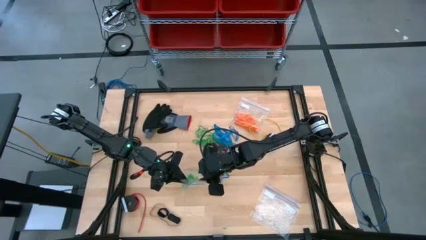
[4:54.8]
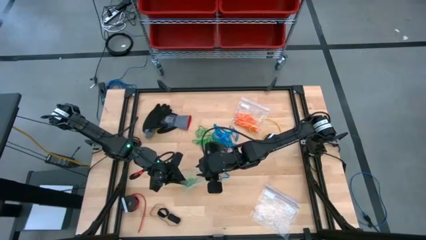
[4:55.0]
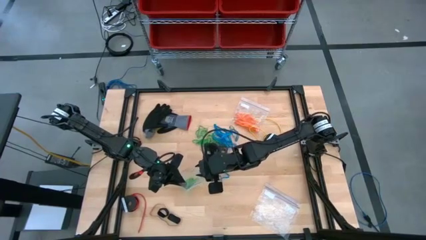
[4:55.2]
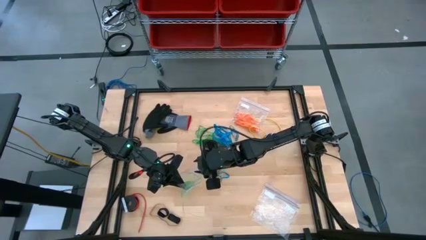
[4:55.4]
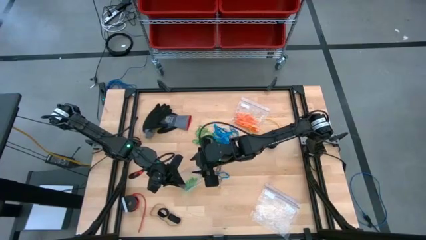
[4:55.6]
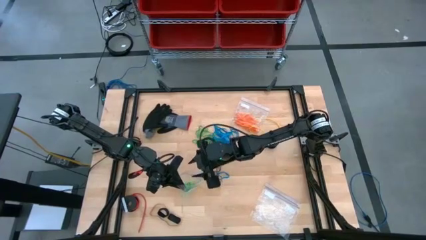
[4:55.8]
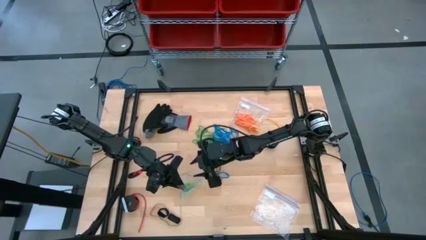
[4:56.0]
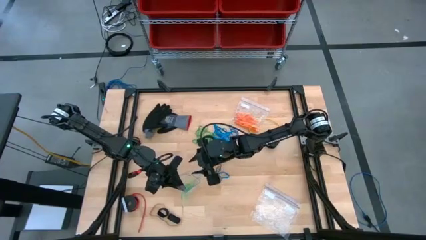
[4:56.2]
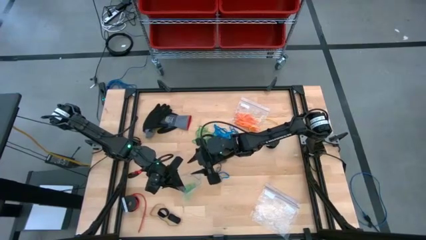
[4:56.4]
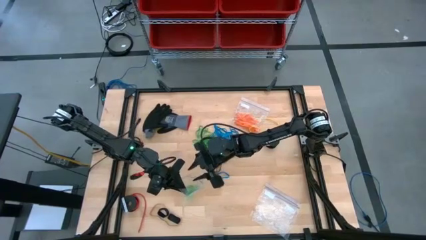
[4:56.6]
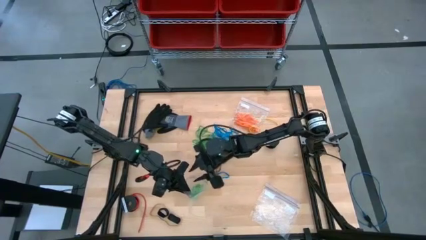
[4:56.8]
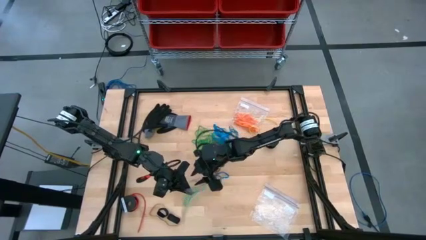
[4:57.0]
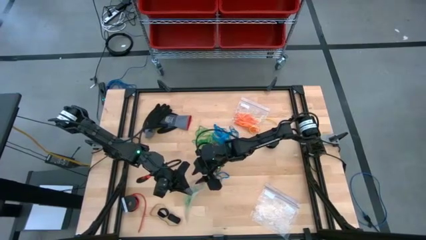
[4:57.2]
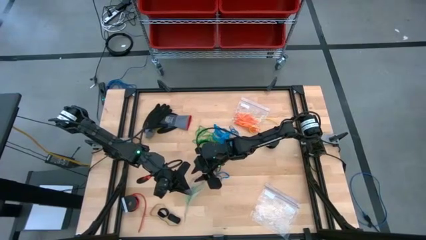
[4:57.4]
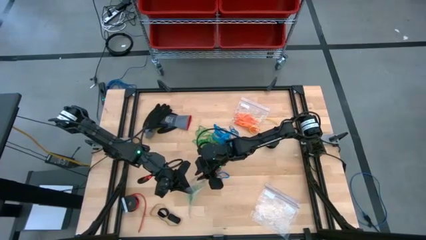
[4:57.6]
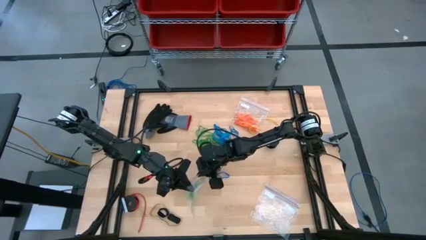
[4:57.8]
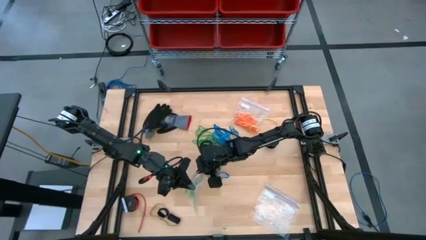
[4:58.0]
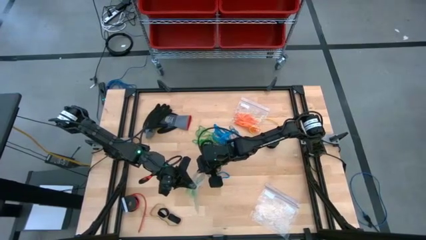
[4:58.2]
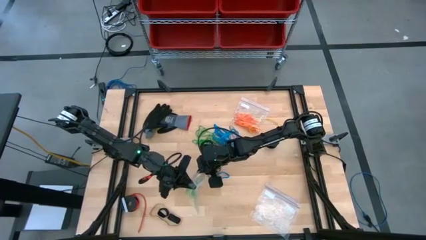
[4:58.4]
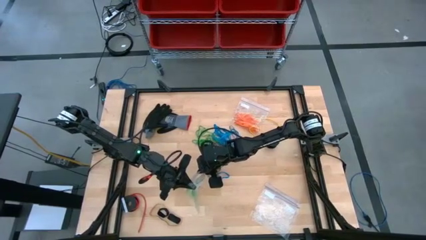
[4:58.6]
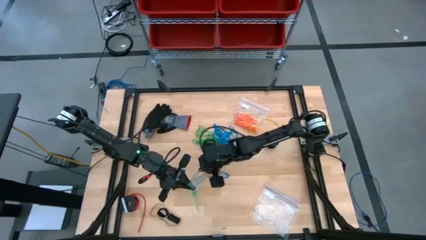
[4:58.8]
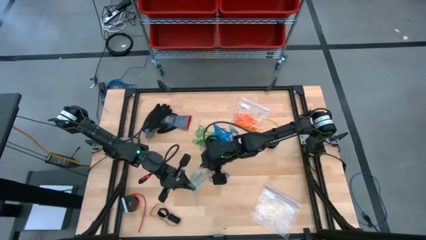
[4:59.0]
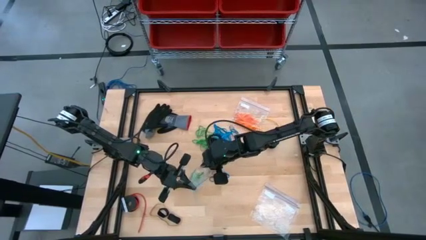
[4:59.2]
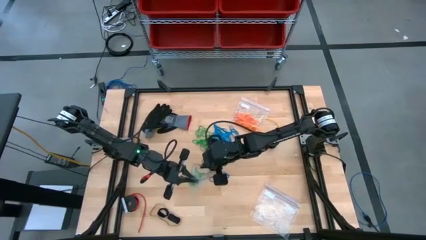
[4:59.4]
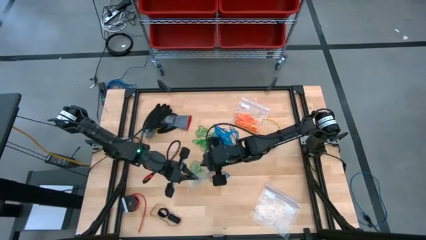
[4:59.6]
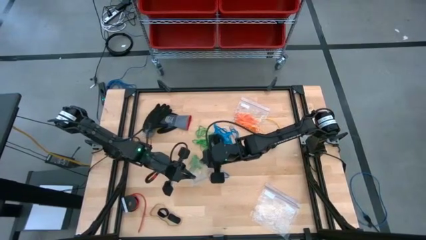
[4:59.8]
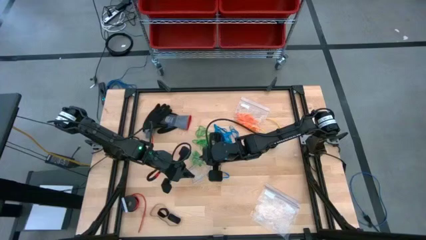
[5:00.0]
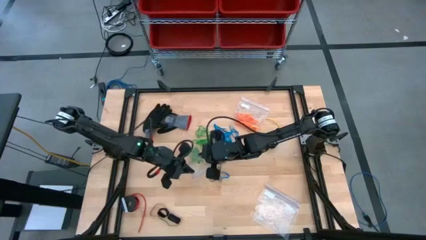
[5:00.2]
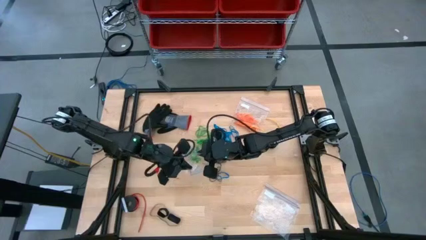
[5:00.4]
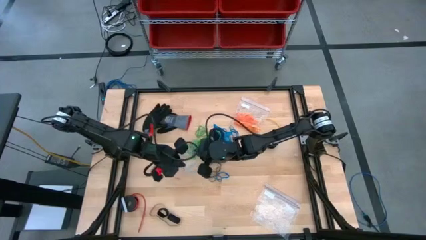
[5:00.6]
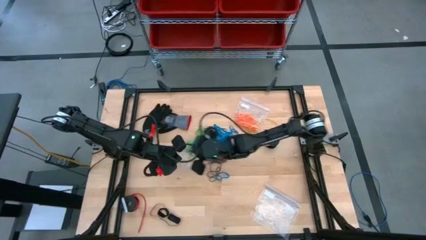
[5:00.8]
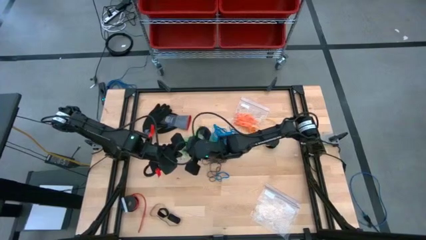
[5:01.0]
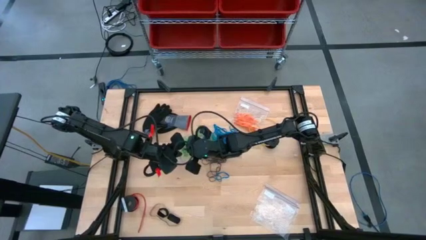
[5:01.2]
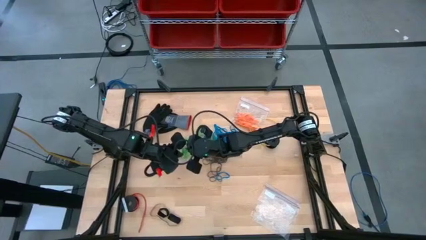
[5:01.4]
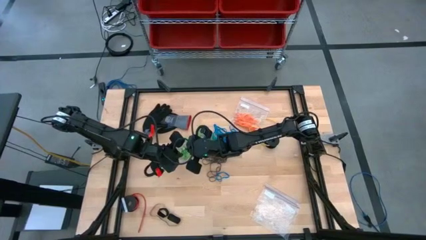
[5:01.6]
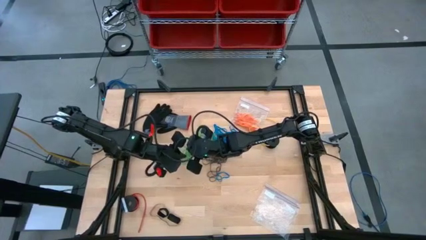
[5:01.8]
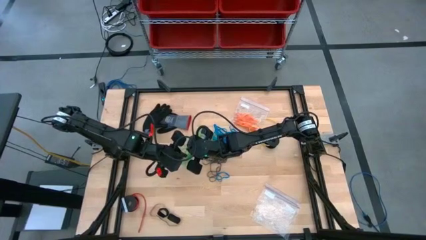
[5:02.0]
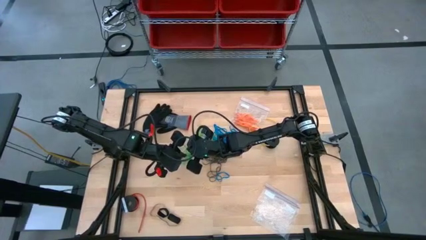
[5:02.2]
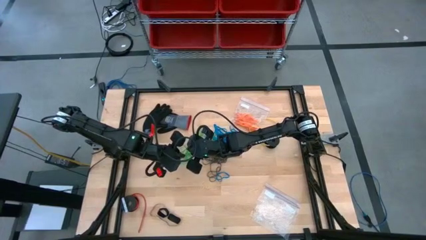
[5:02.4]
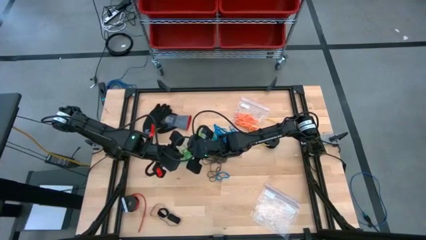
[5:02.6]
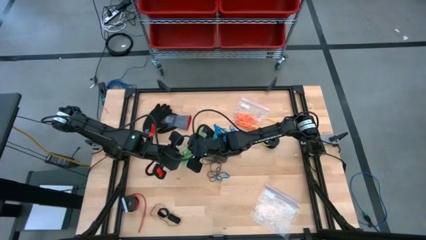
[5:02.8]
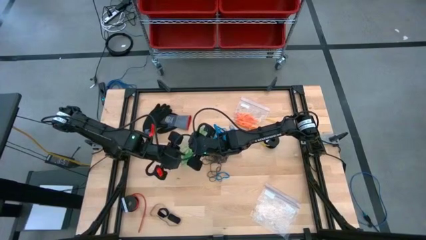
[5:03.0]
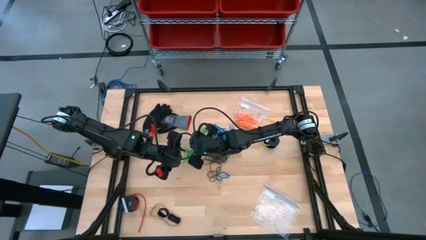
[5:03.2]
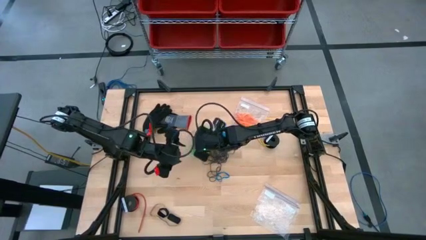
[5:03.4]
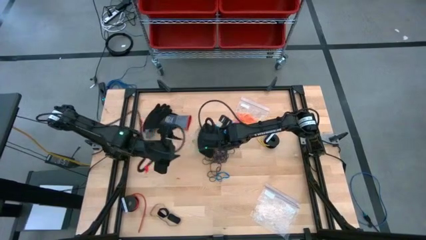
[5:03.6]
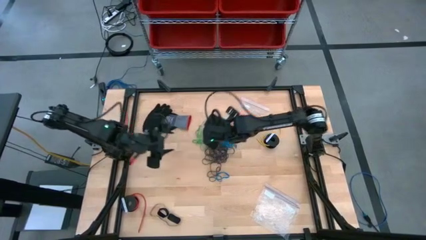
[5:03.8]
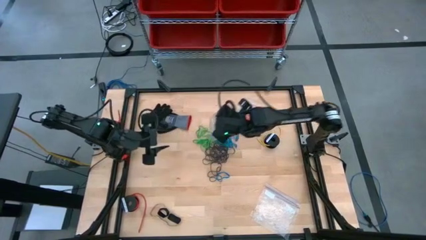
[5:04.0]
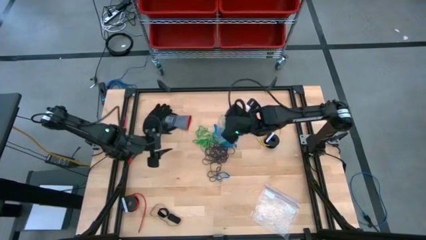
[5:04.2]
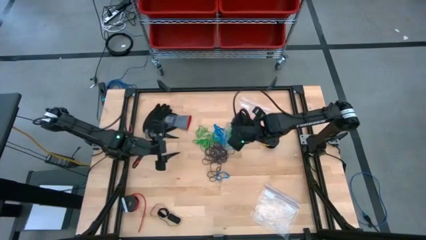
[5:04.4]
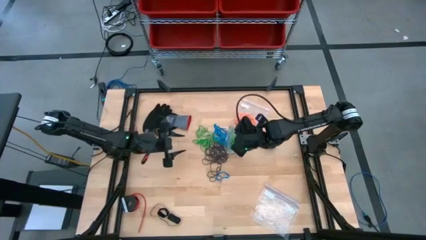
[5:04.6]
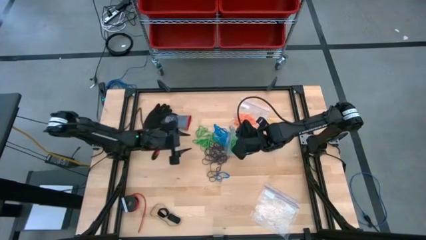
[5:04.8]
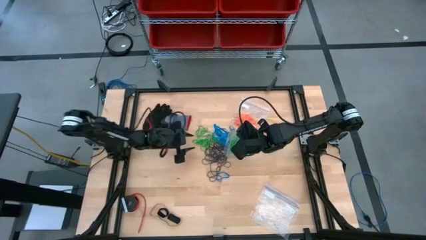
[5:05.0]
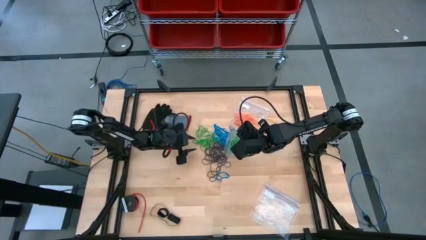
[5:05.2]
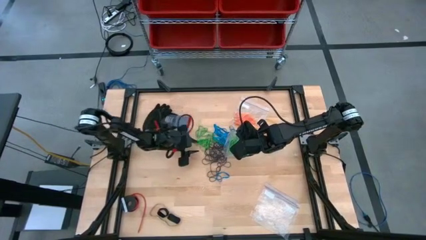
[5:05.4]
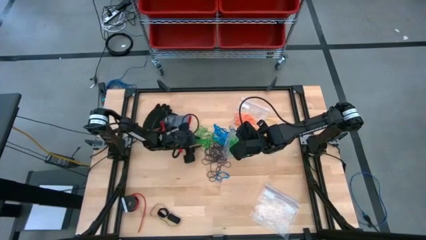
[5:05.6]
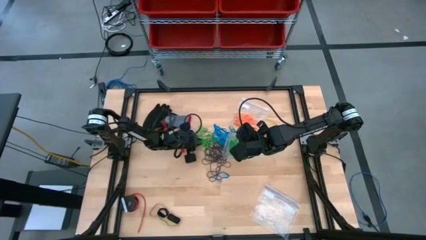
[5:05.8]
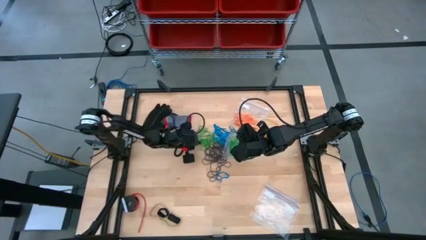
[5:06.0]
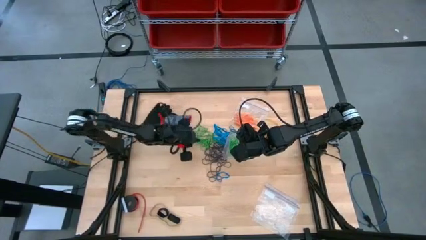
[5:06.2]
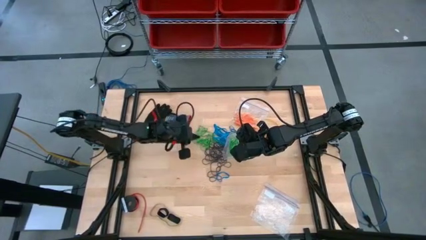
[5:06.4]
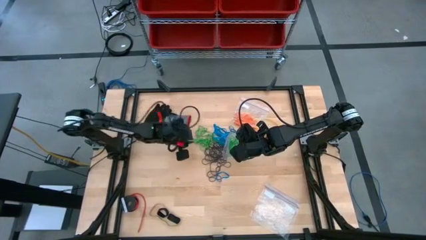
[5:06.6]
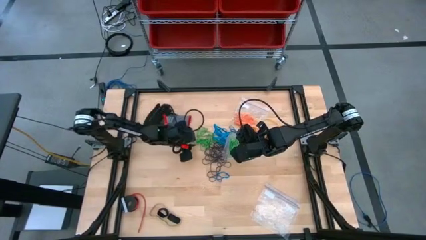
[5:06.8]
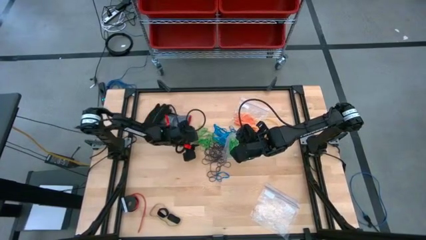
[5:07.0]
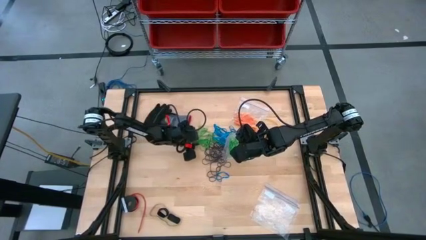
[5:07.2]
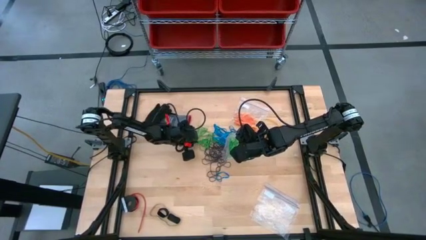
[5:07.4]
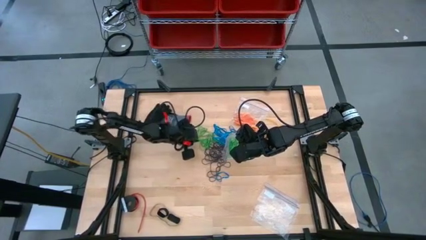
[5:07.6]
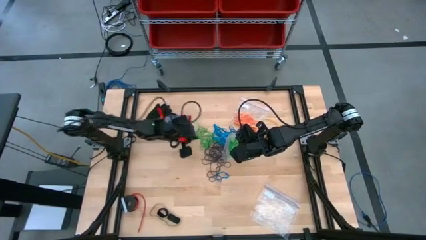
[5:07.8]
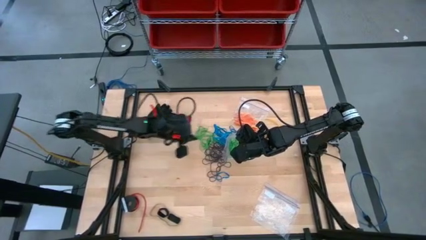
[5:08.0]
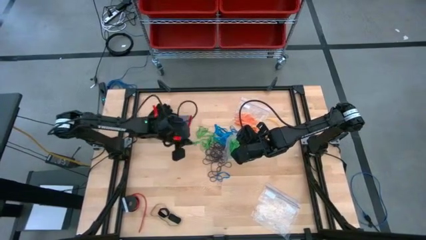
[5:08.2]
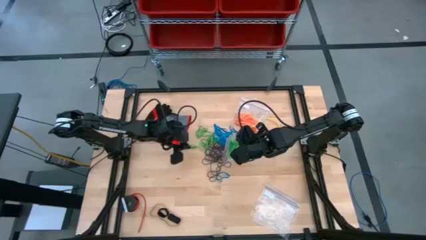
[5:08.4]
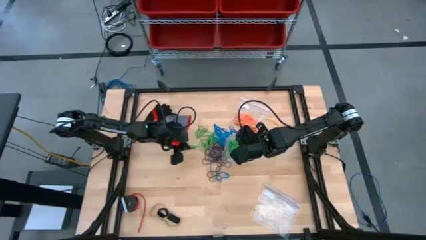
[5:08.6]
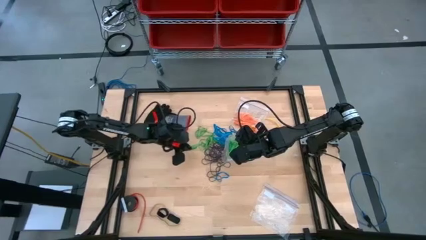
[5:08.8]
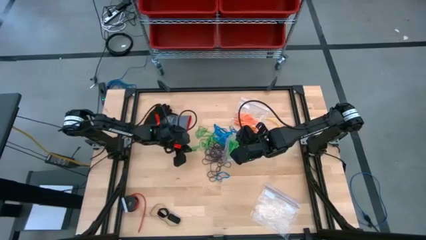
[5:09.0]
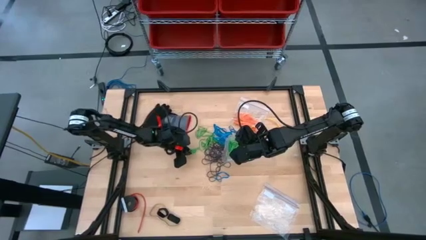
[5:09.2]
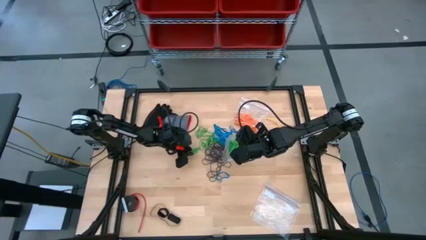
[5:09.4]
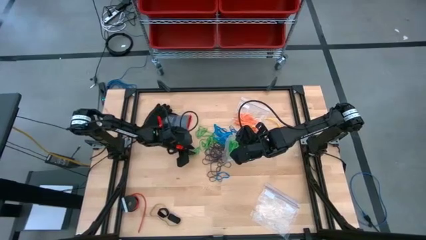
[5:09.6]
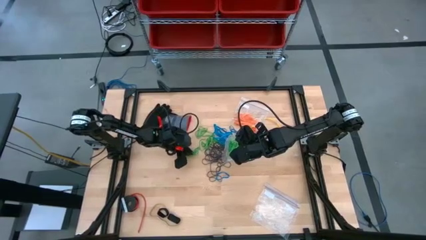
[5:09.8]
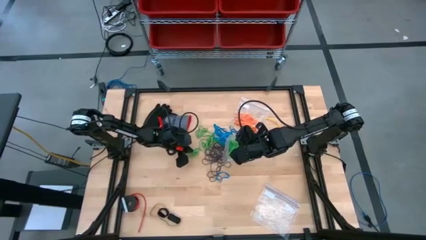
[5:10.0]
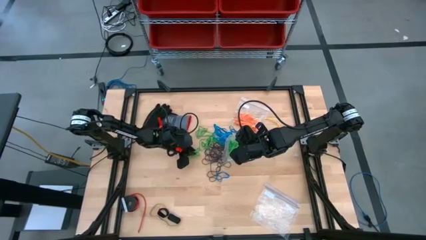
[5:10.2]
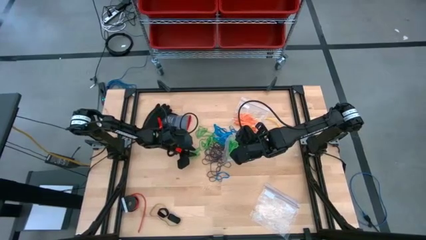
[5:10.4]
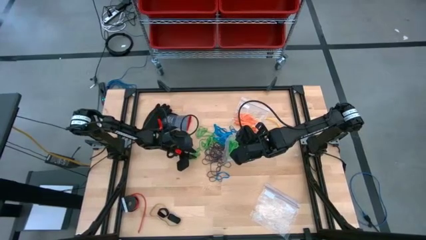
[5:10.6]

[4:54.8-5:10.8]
Task: Sort rubber bands
Put the green rubber band into the transparent zip bag

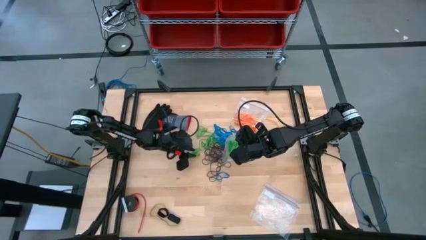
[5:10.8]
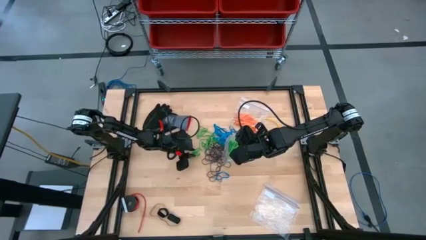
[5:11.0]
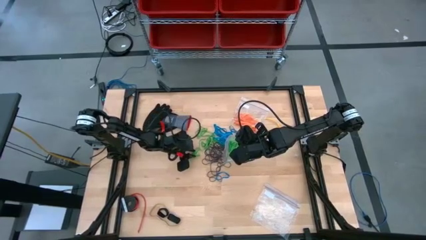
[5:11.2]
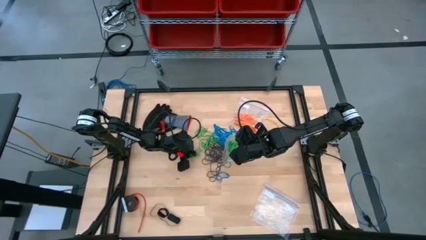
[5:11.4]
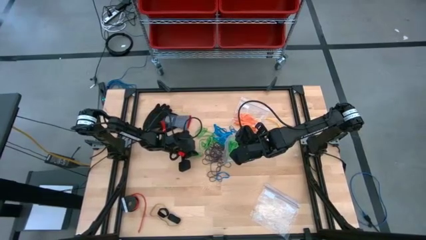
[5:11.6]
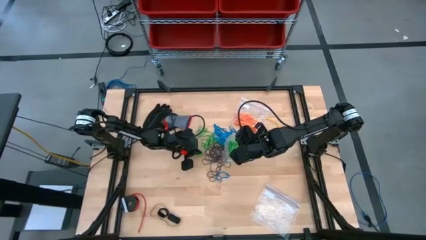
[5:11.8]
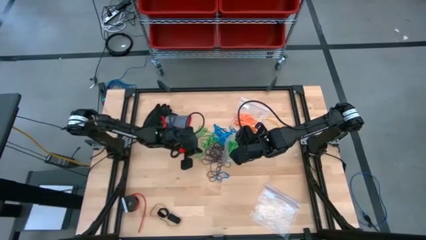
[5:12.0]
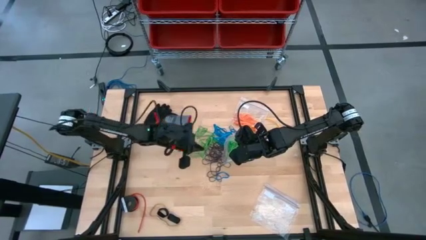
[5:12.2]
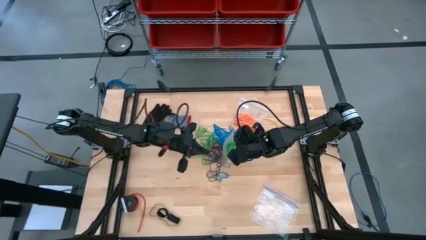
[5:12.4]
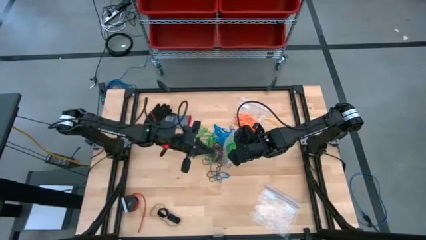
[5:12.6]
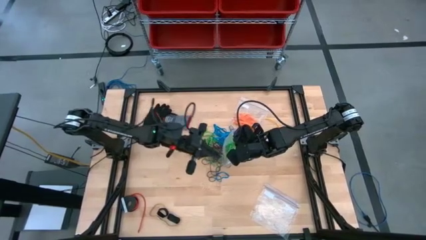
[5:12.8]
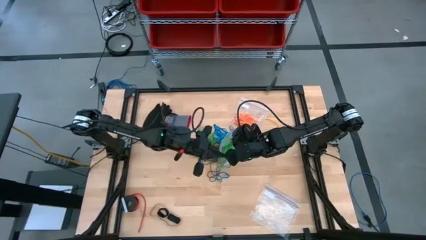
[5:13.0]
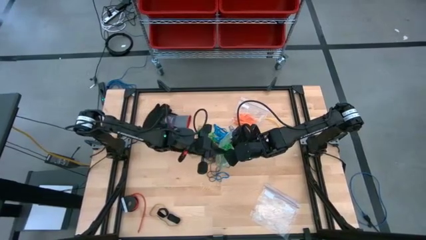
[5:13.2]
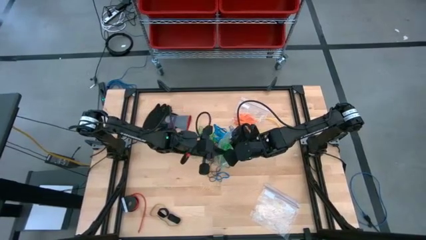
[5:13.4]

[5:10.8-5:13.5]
Put the green rubber band into the transparent zip bag
